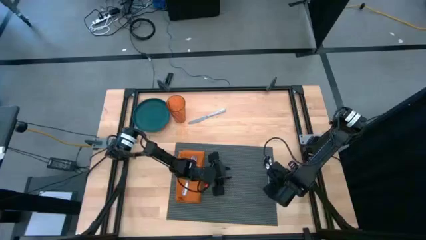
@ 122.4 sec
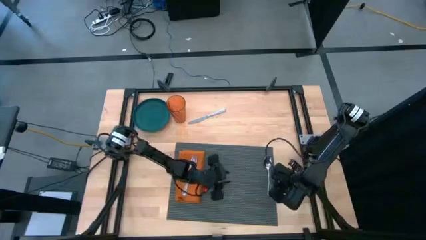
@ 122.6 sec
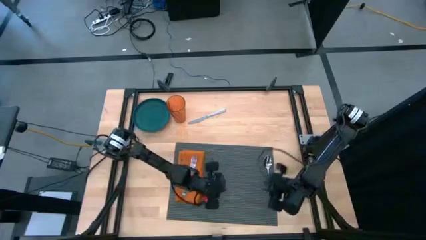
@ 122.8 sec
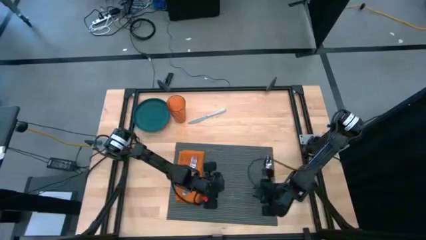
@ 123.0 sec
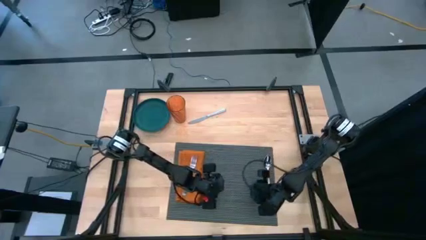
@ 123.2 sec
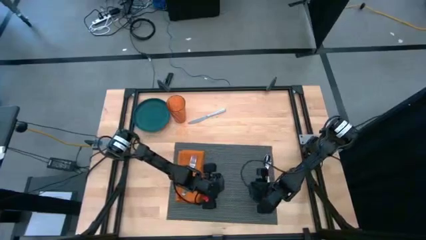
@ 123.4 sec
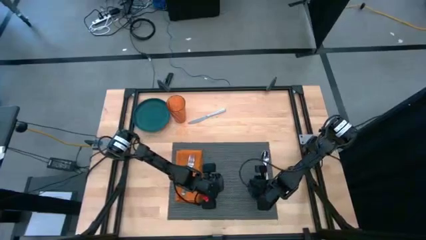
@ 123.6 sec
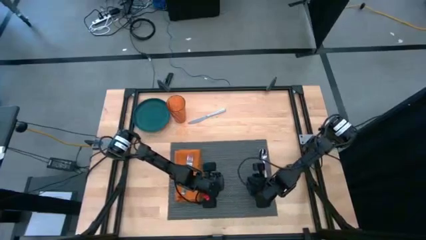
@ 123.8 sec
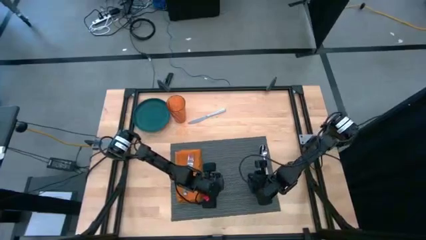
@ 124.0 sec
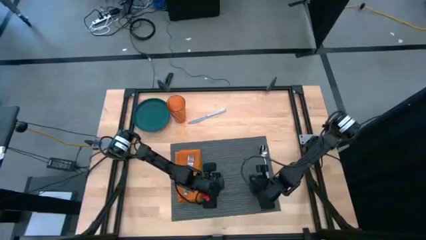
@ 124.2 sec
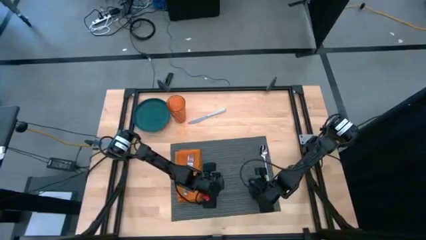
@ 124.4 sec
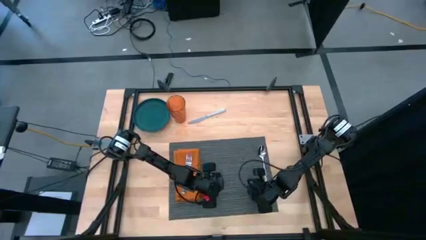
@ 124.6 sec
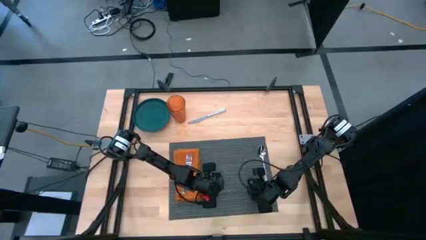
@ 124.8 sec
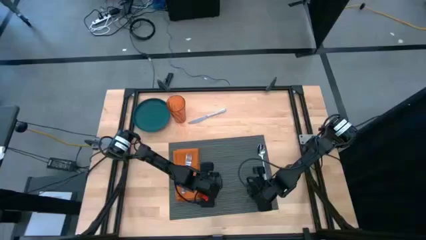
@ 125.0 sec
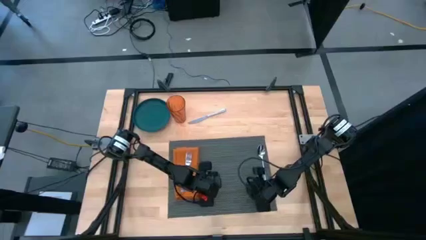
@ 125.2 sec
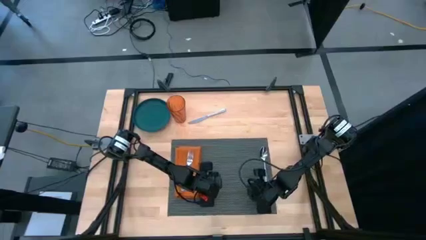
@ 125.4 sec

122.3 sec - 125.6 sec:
Task: Set table place
Adjust the black placemat

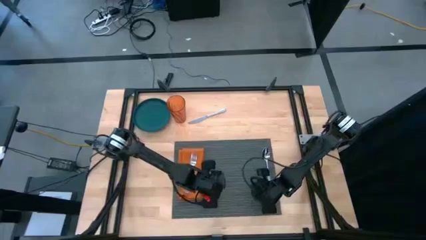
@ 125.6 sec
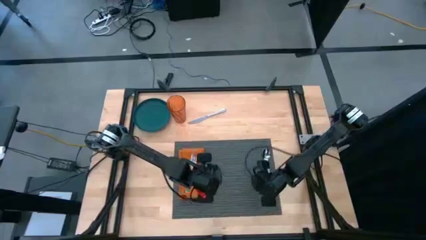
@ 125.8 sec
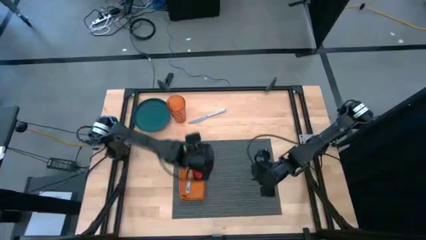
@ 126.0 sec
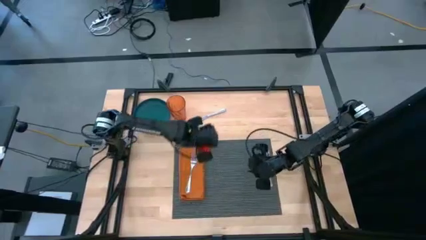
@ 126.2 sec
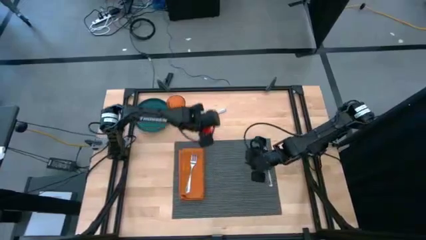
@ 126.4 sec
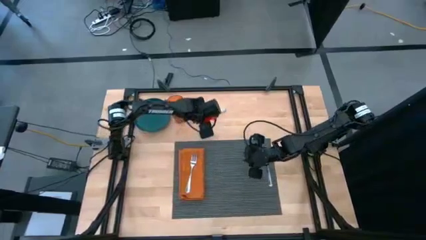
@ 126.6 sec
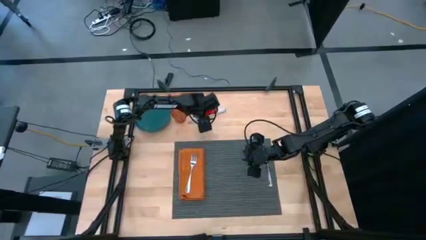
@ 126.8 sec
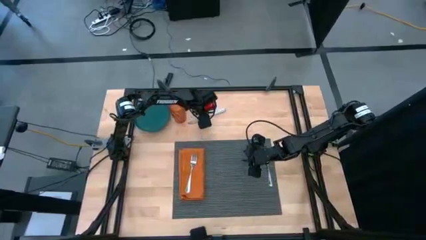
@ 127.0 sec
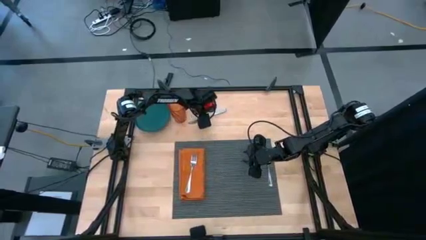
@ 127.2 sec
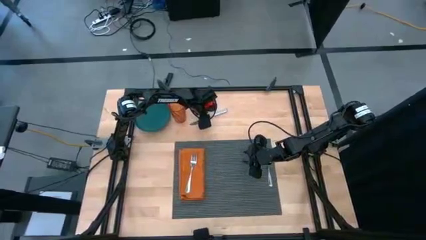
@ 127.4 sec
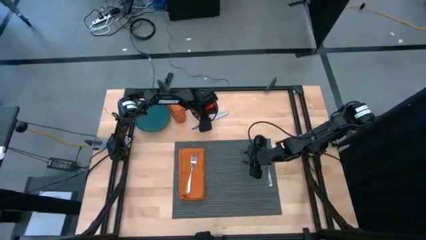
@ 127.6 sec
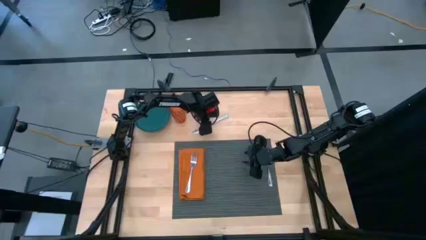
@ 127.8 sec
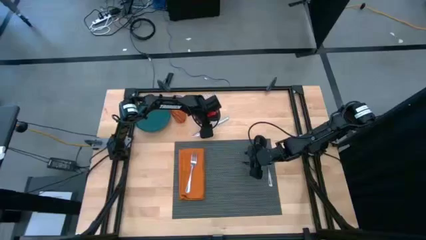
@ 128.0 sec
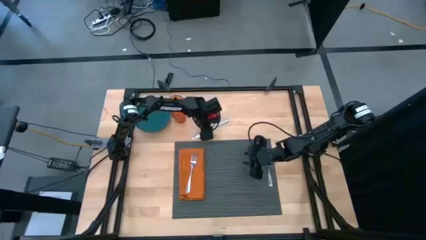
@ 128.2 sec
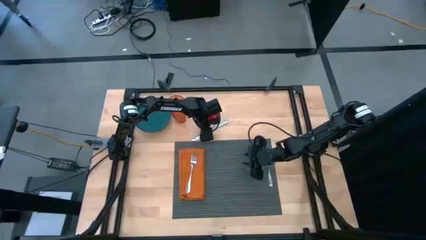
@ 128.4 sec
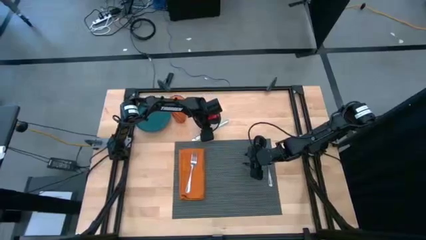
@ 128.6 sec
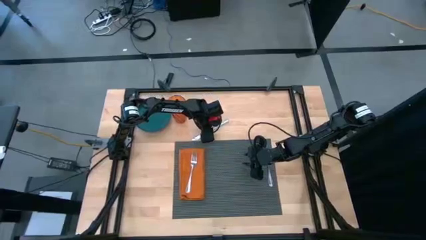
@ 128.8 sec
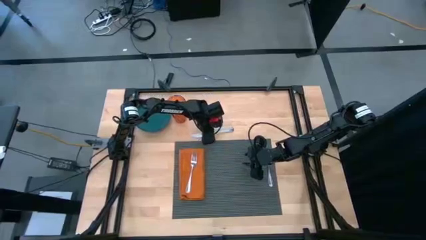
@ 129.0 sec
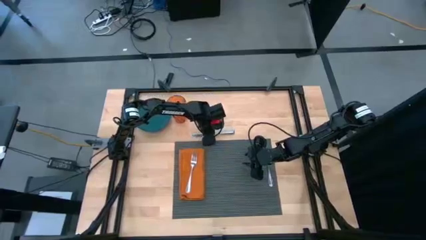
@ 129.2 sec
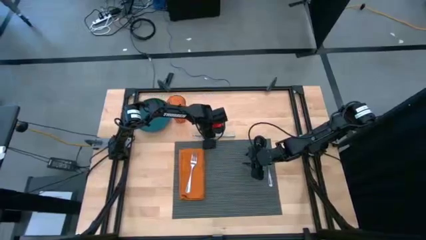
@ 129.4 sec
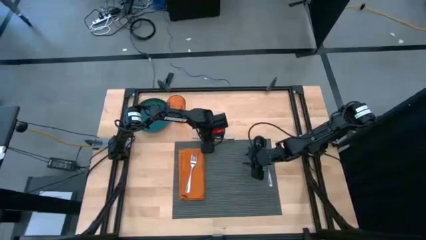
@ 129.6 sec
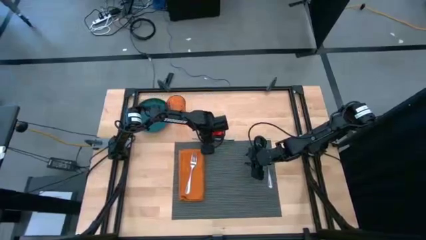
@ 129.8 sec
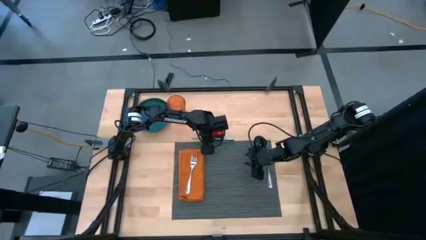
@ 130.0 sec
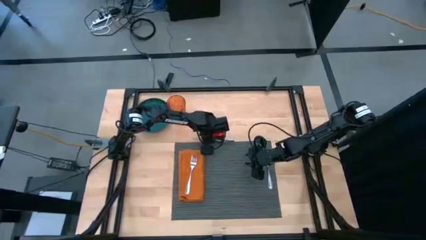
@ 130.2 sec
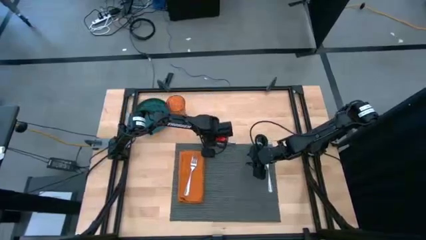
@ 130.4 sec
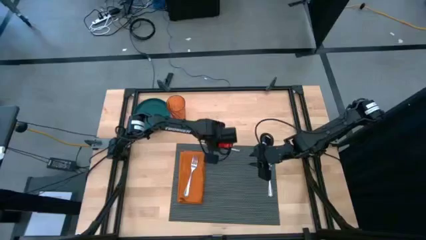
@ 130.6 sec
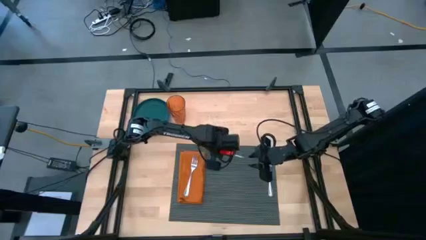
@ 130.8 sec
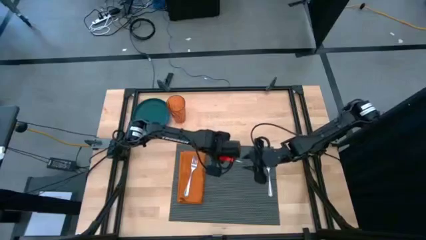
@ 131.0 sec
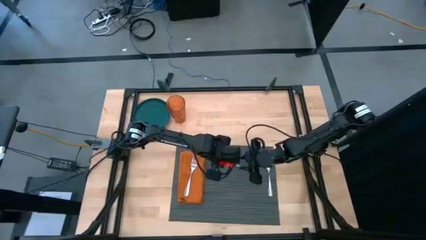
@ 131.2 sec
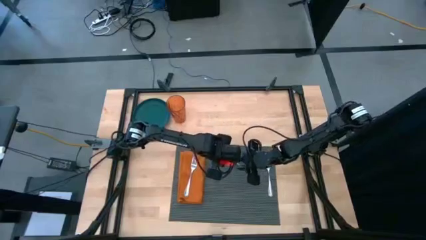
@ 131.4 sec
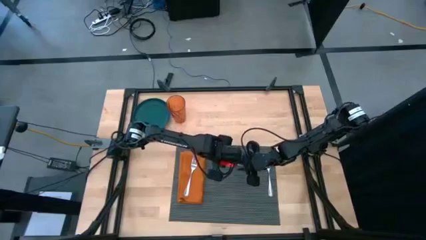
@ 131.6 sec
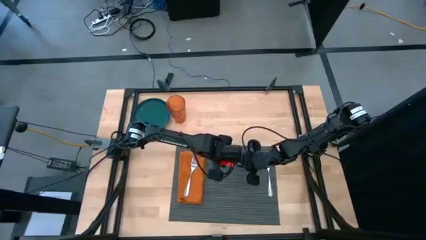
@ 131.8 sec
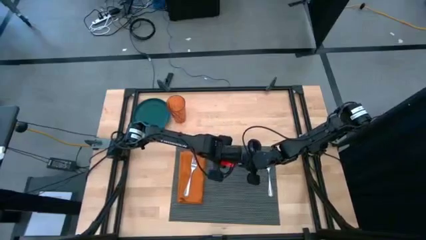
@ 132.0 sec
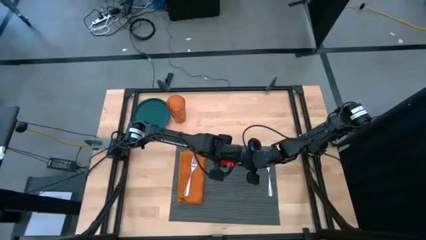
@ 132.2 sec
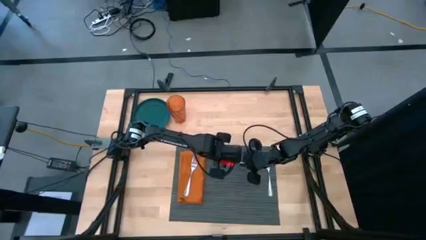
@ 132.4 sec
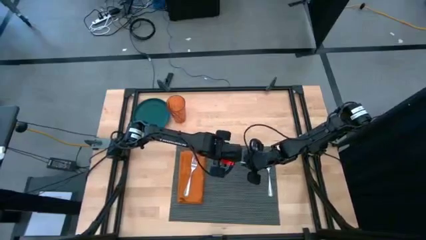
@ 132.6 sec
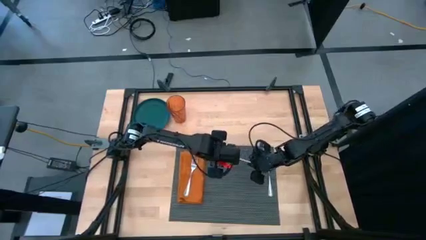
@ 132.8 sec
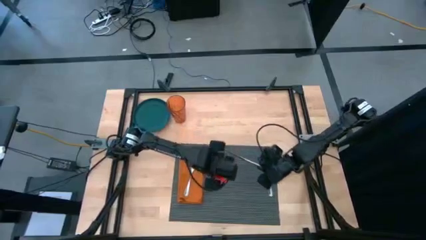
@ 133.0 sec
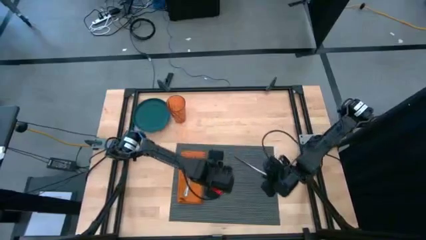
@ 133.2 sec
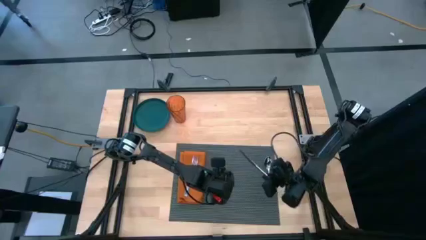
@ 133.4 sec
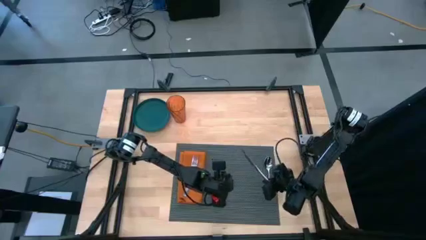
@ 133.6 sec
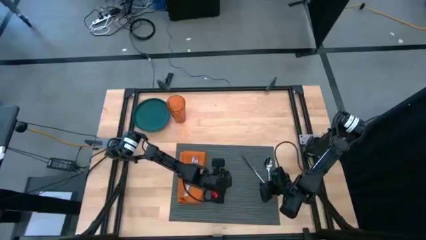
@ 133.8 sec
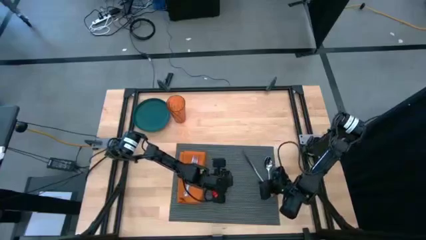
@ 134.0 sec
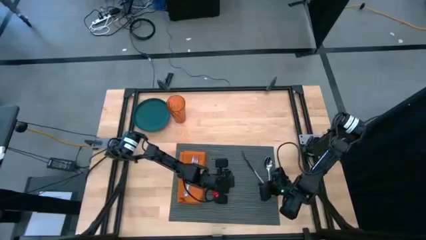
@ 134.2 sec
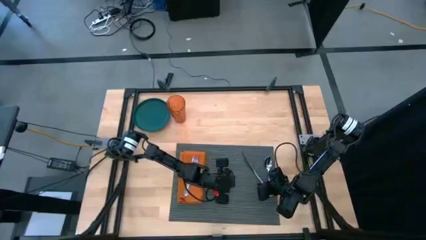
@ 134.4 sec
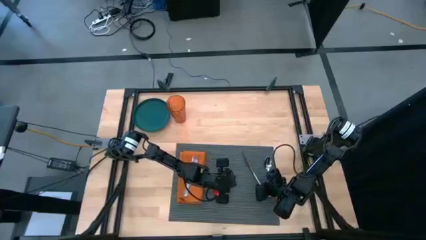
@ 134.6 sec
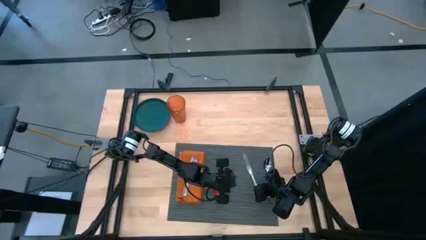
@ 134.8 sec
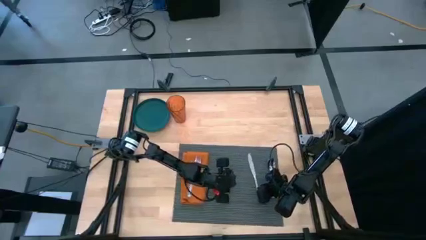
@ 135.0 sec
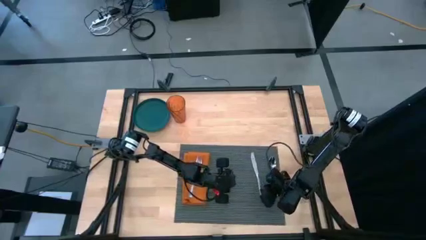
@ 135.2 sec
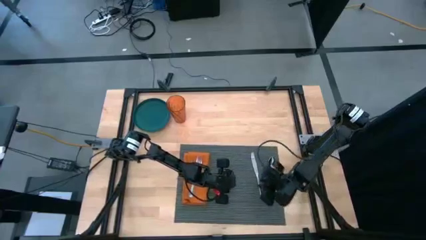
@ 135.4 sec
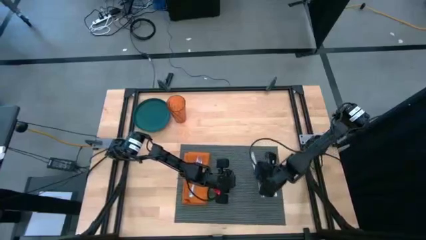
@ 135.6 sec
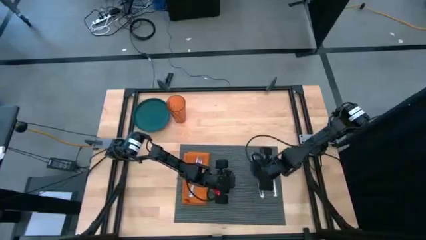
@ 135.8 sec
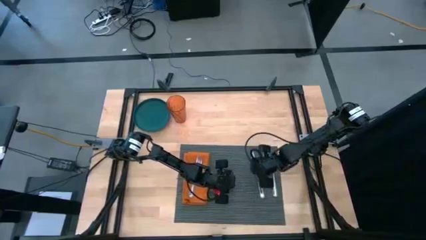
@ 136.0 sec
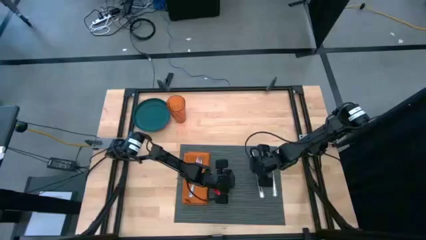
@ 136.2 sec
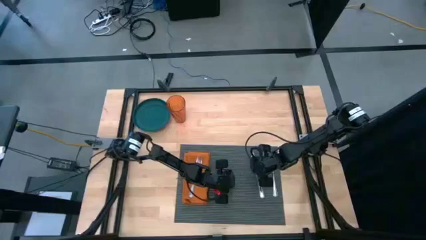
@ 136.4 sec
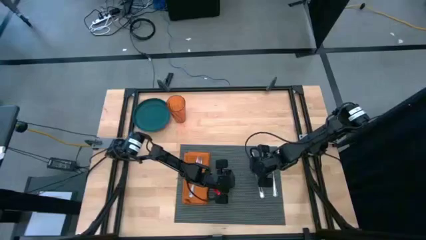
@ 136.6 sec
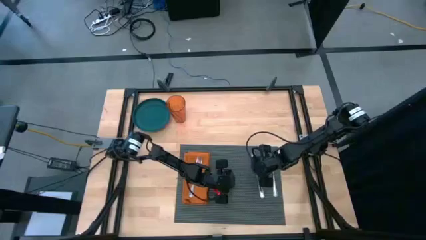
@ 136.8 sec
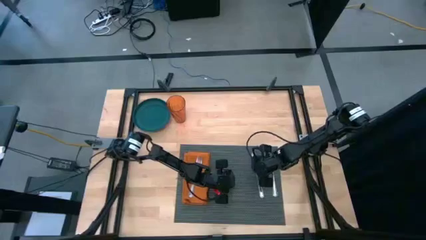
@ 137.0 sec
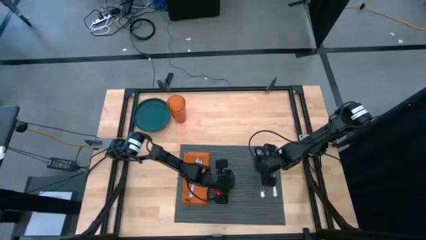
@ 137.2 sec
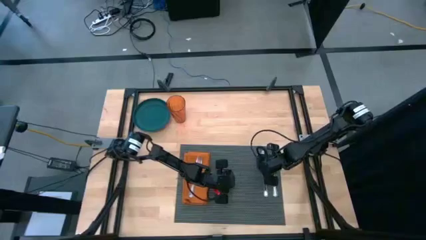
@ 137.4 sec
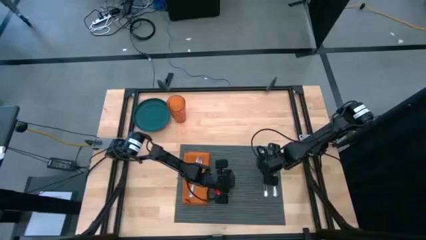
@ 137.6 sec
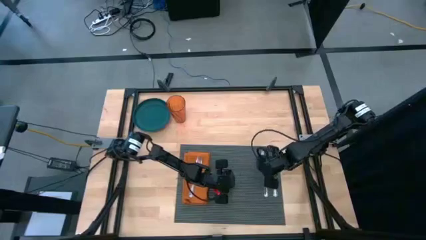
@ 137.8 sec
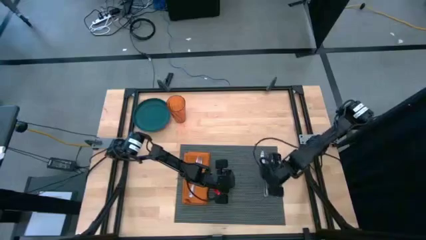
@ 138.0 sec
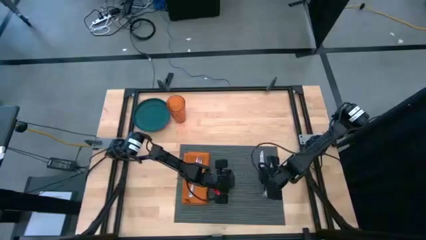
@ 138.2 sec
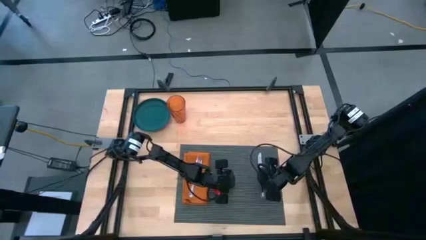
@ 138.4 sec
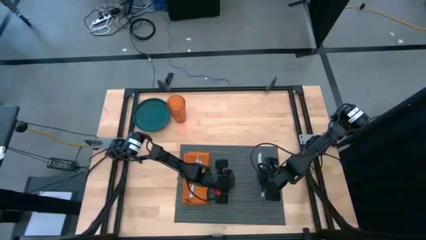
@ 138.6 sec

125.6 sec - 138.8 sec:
Put the silver table knife on the black placemat to the left of the silver spoon
